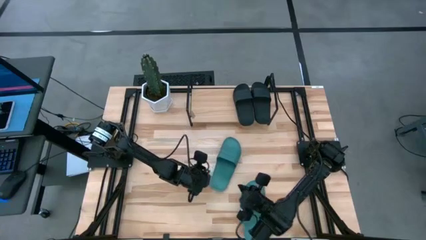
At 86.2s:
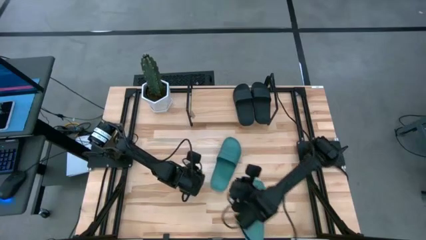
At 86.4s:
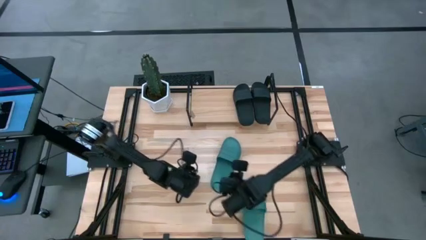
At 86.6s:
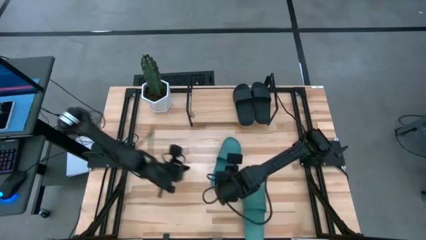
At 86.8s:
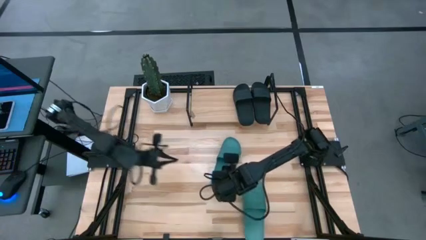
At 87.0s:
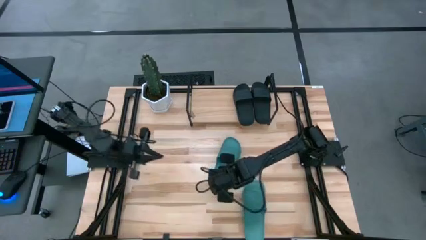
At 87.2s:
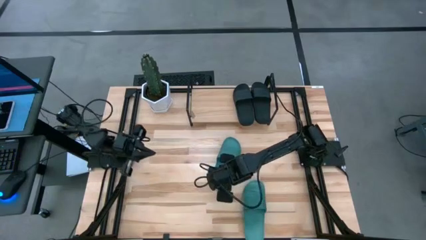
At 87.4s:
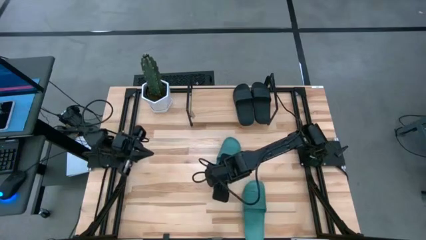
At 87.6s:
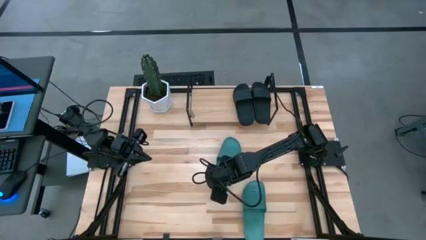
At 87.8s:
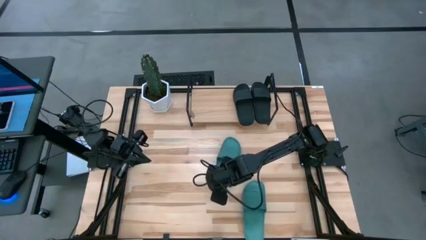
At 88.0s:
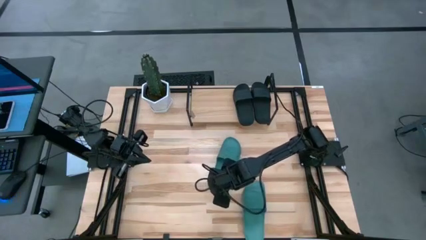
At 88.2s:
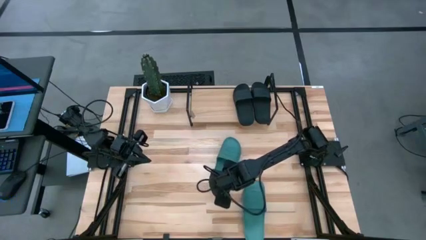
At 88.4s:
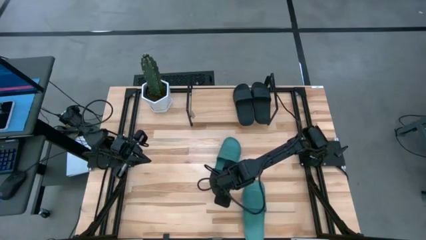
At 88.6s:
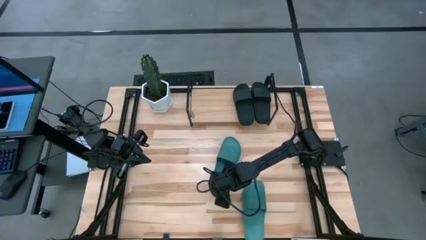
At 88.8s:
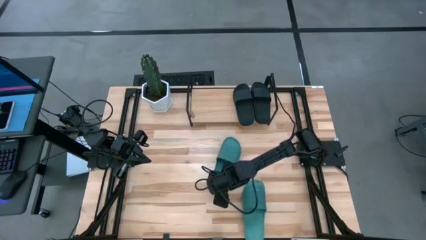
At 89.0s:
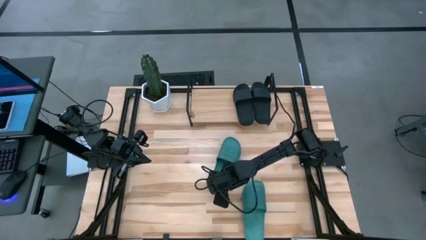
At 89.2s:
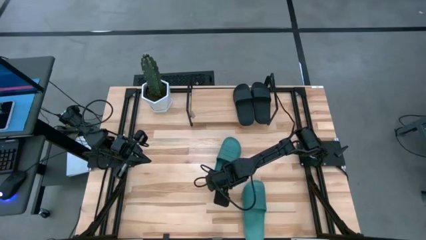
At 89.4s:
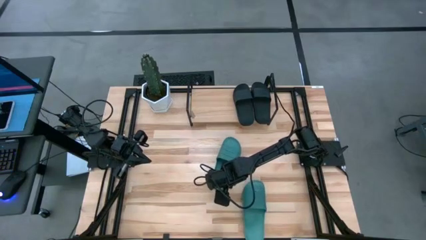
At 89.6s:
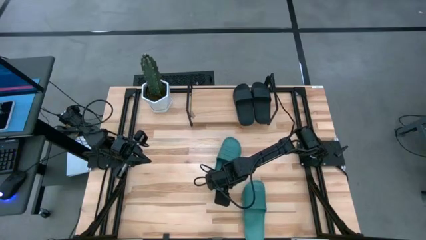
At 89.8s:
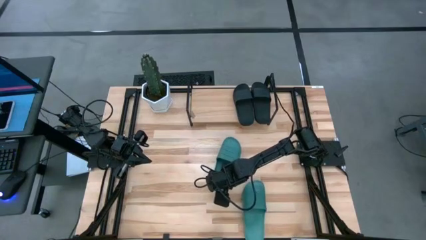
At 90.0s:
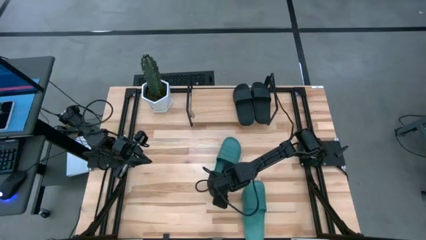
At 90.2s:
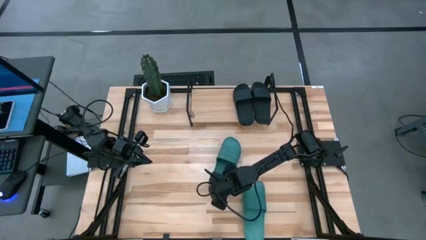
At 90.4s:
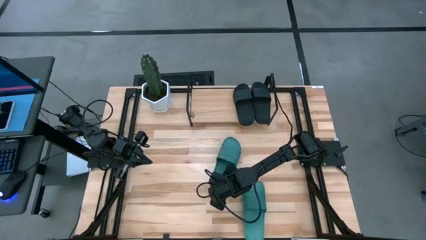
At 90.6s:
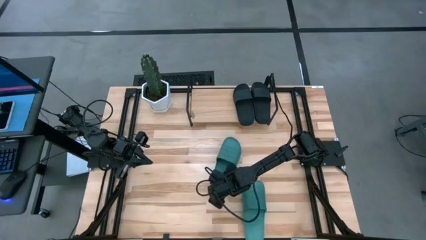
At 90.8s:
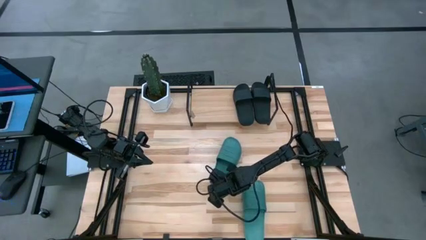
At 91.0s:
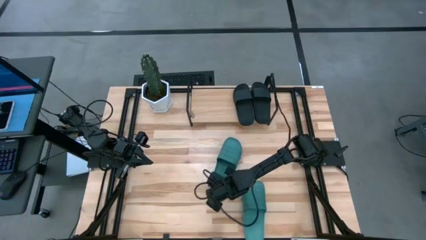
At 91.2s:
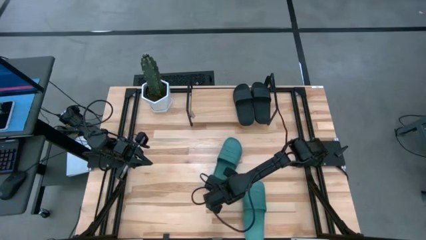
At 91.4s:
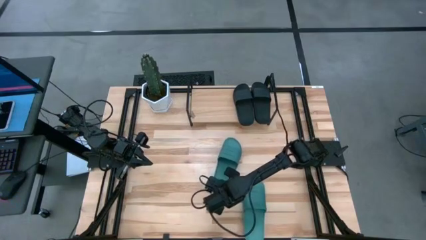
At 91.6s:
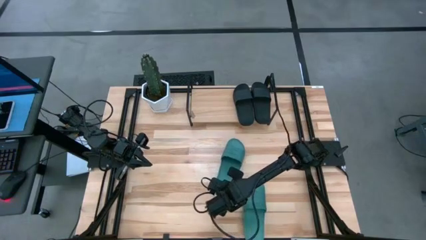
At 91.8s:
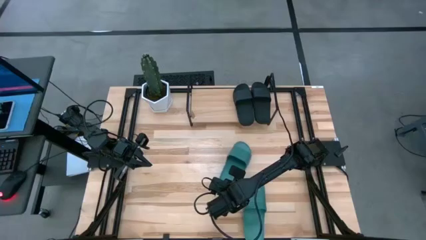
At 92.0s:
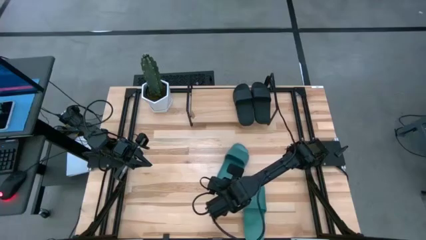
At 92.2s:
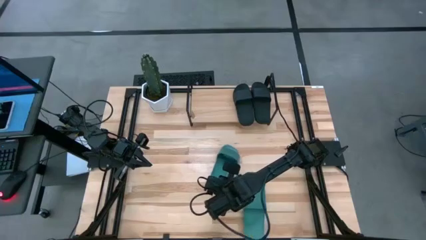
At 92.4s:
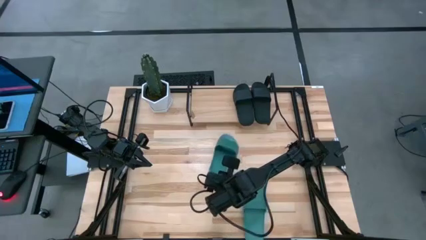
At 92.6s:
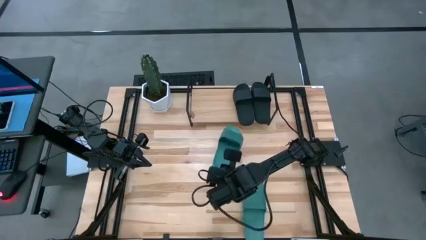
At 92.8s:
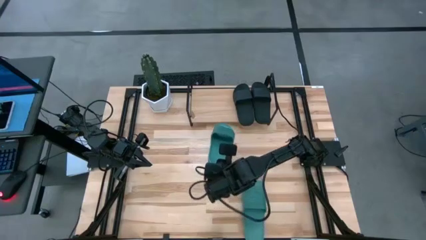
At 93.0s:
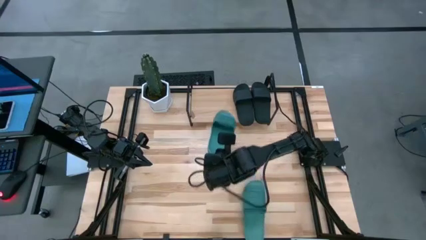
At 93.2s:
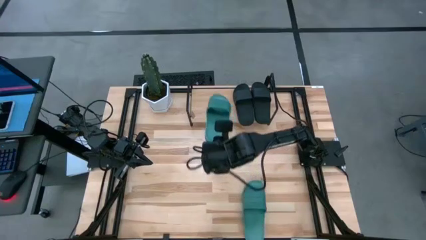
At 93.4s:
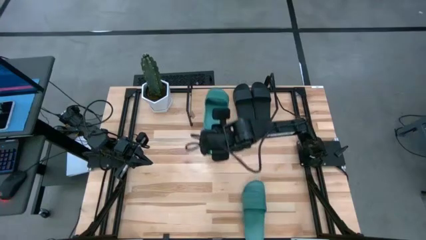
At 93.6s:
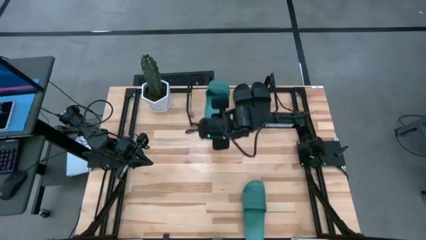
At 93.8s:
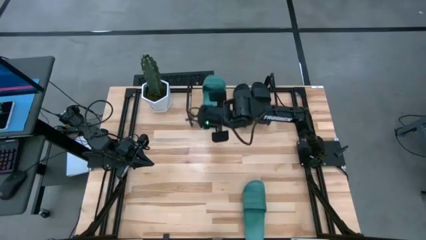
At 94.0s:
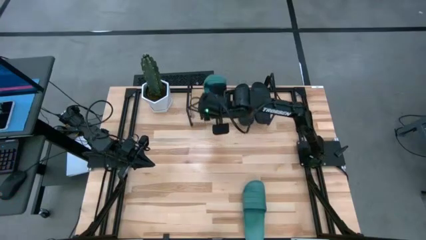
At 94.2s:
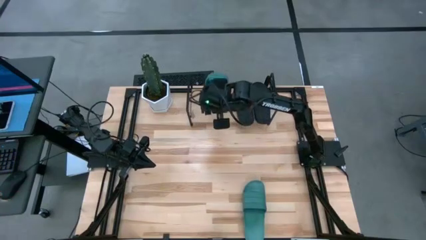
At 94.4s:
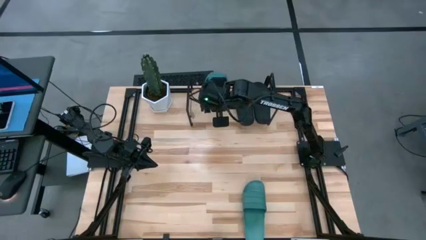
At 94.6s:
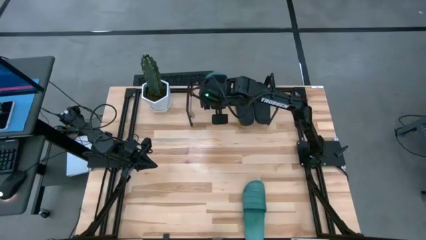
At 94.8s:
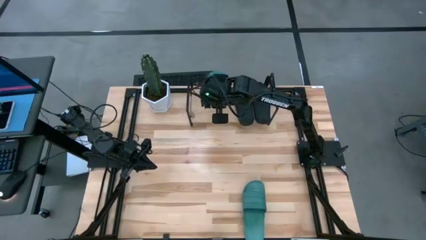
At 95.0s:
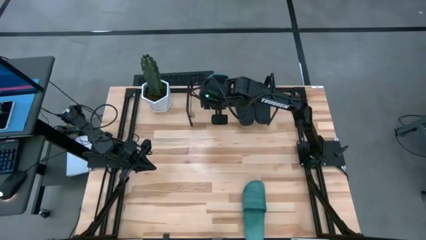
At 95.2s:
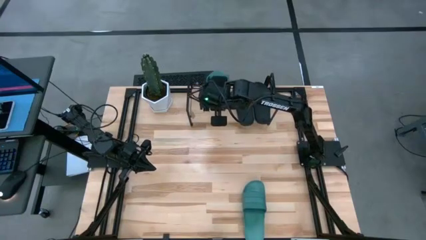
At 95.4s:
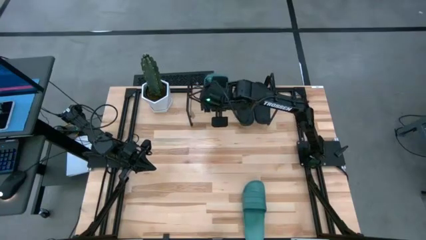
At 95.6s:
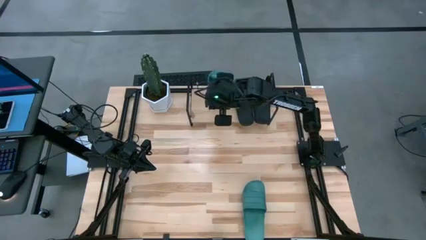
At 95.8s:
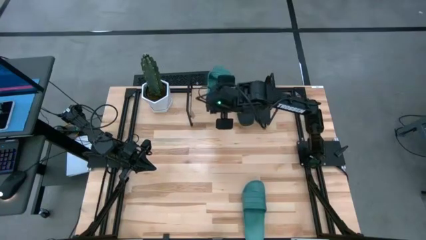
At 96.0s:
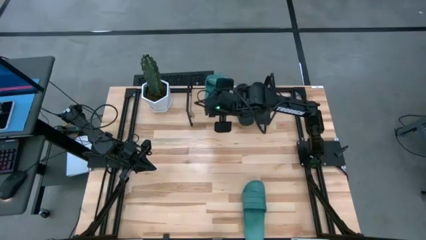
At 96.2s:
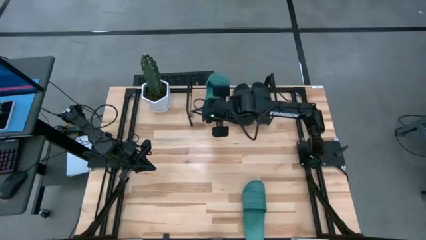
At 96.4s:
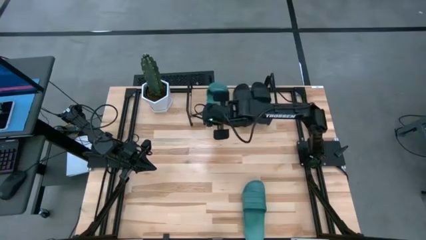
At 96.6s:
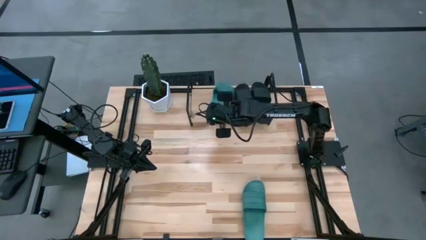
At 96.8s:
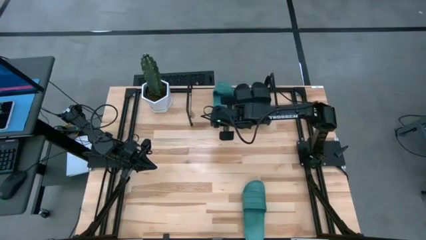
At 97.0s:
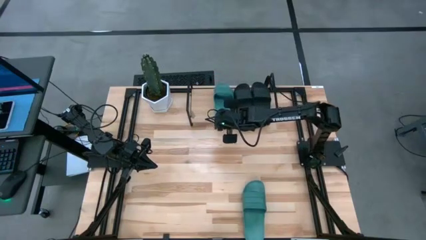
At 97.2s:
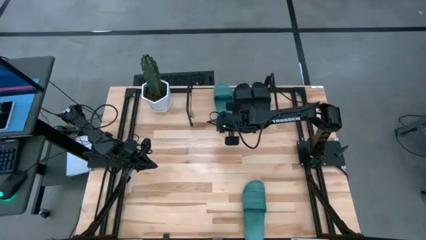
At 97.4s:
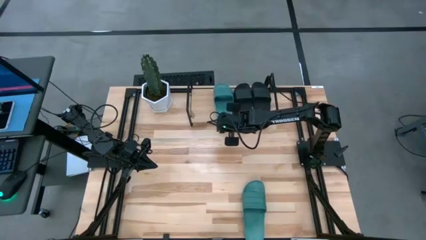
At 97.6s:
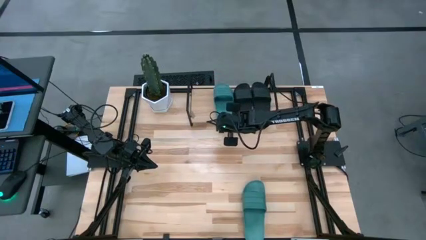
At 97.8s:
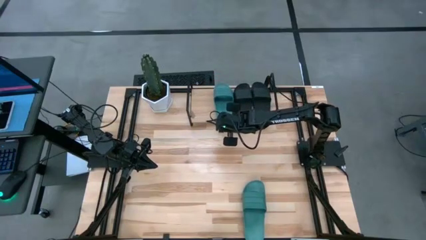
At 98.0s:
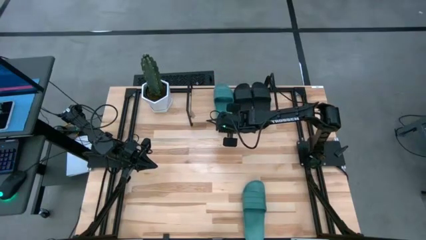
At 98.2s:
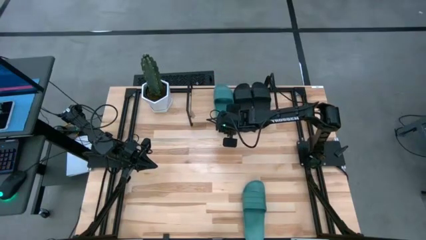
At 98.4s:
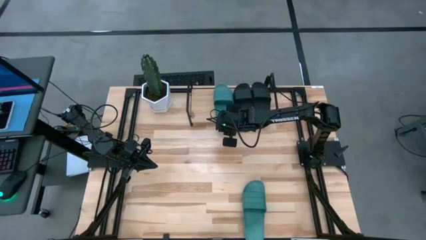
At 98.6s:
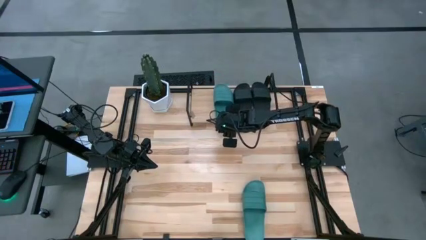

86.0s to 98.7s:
Task: Pick and place slides into the shelf
Put the top green slide on the shelf
